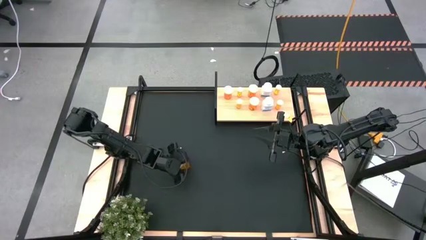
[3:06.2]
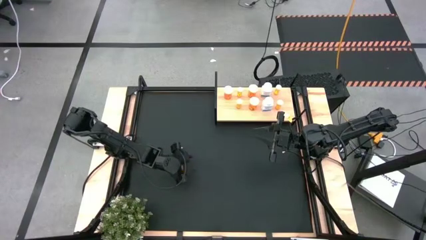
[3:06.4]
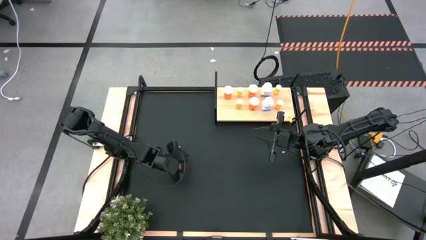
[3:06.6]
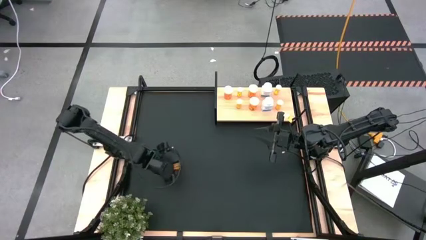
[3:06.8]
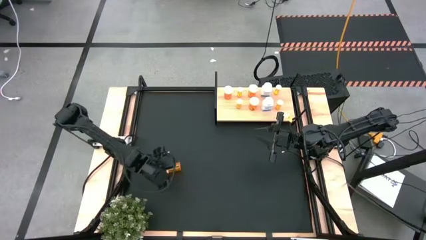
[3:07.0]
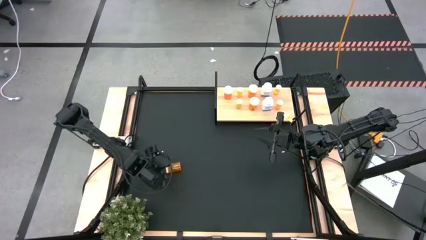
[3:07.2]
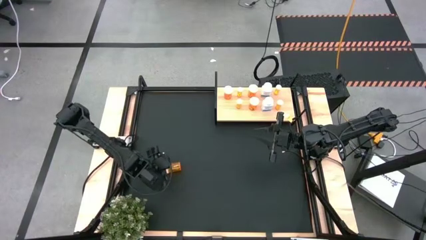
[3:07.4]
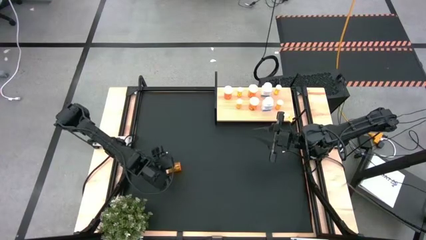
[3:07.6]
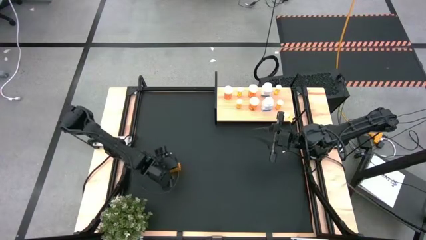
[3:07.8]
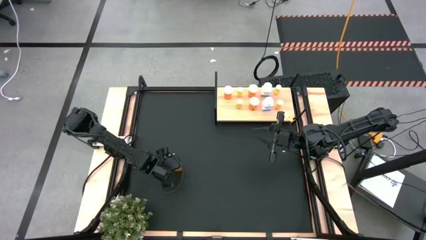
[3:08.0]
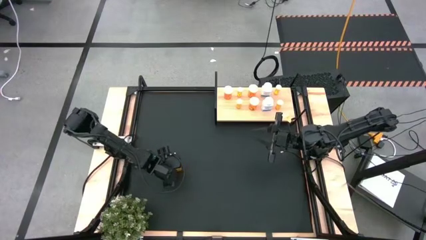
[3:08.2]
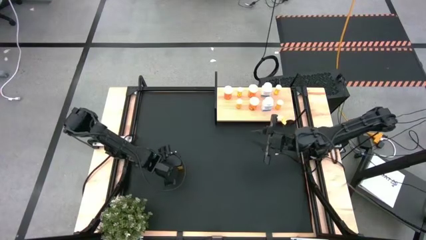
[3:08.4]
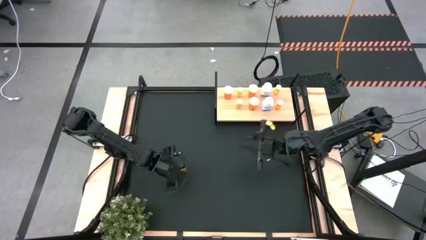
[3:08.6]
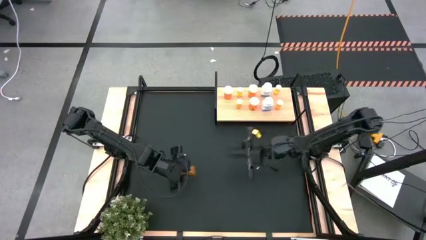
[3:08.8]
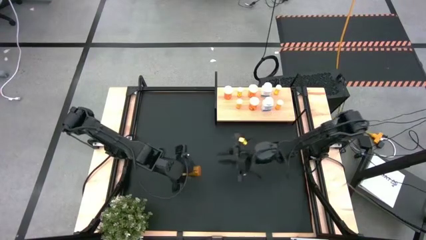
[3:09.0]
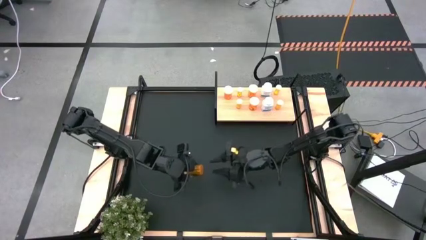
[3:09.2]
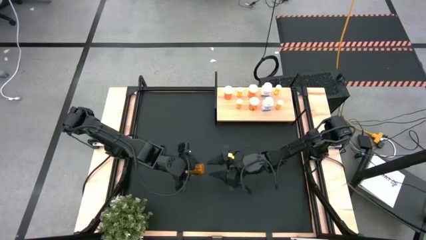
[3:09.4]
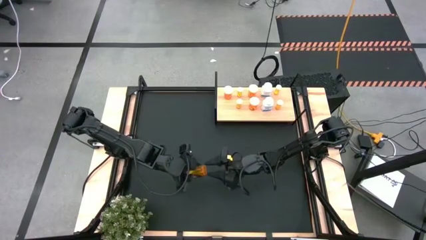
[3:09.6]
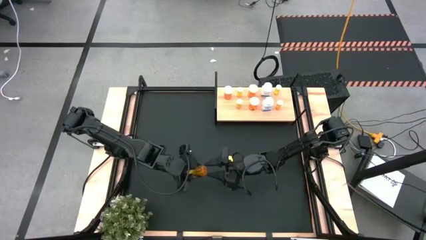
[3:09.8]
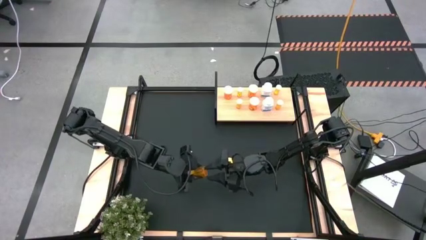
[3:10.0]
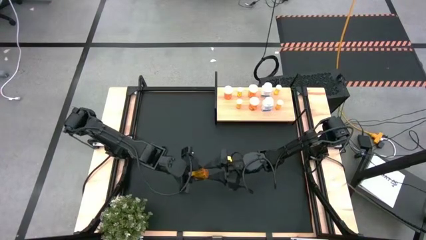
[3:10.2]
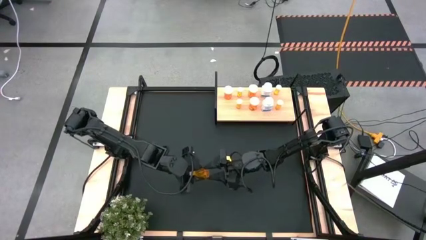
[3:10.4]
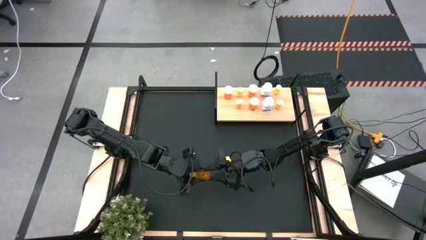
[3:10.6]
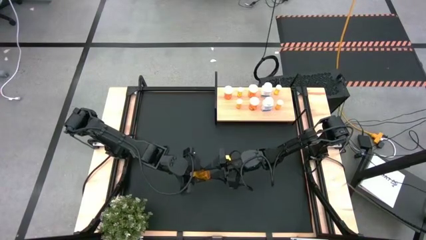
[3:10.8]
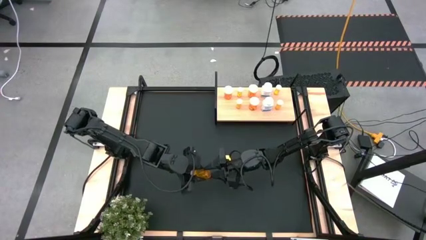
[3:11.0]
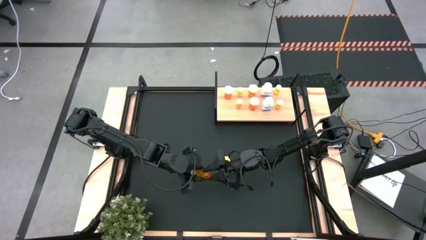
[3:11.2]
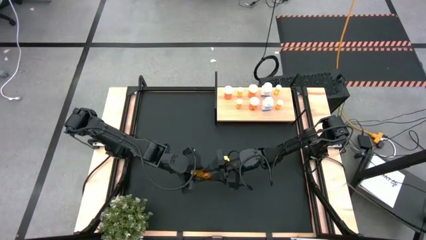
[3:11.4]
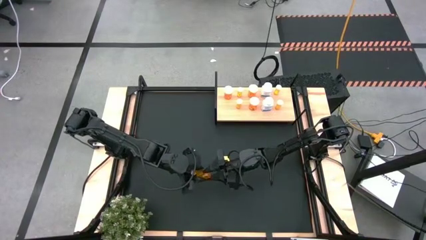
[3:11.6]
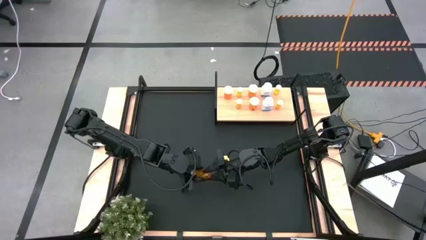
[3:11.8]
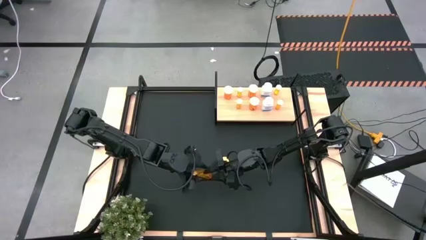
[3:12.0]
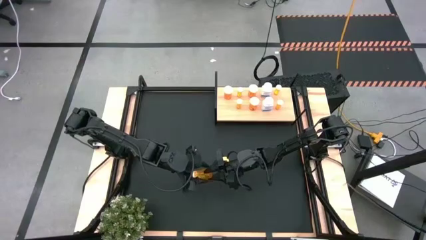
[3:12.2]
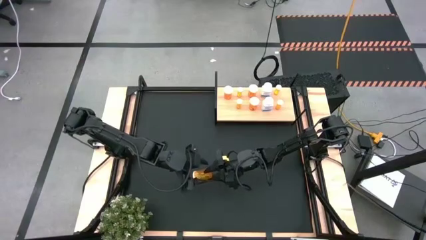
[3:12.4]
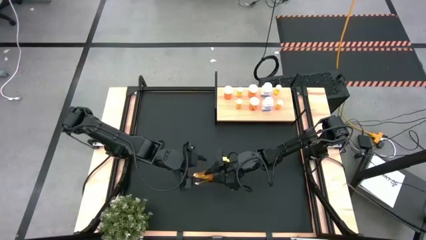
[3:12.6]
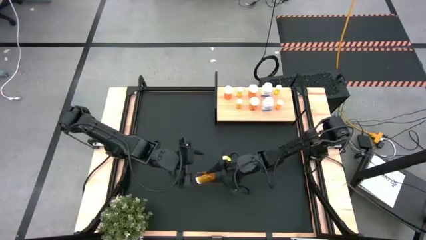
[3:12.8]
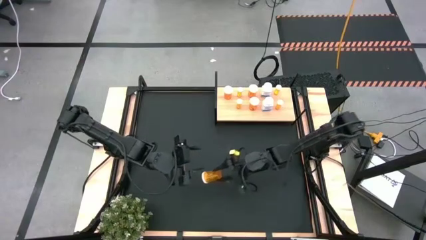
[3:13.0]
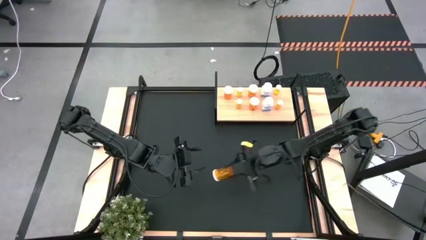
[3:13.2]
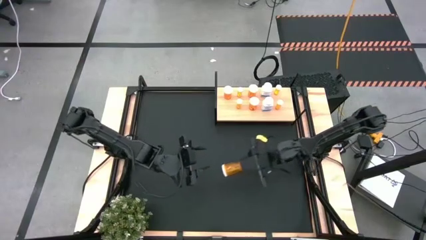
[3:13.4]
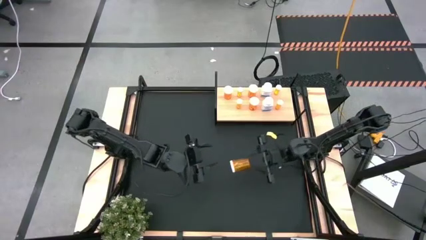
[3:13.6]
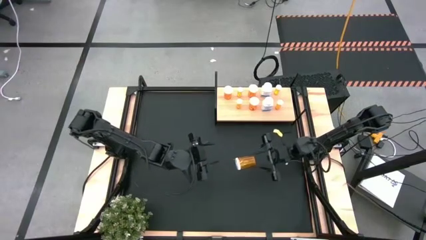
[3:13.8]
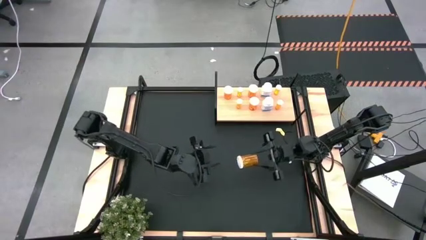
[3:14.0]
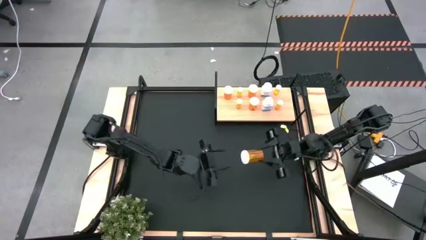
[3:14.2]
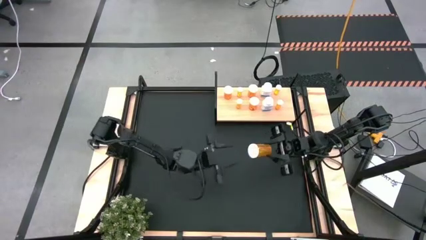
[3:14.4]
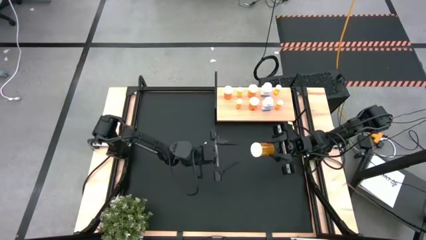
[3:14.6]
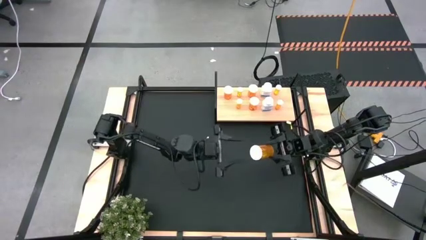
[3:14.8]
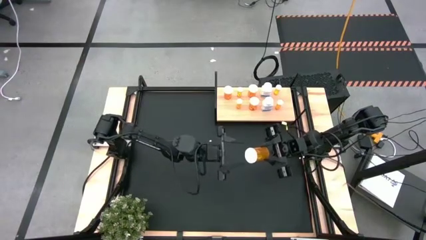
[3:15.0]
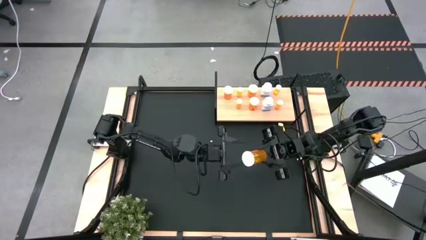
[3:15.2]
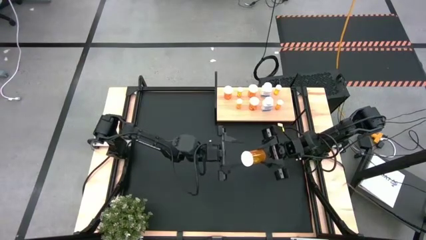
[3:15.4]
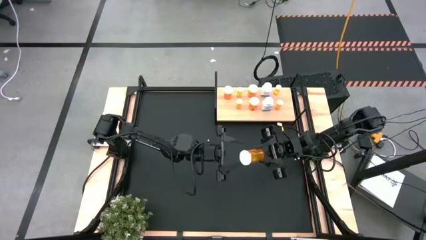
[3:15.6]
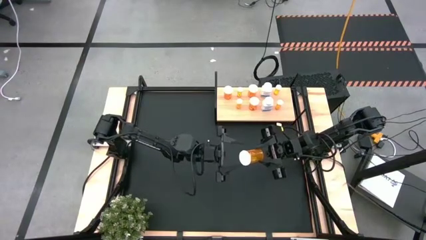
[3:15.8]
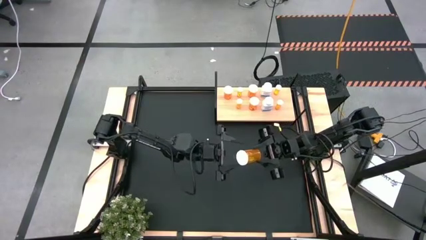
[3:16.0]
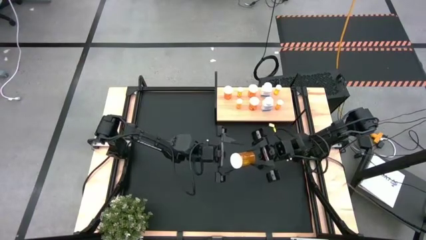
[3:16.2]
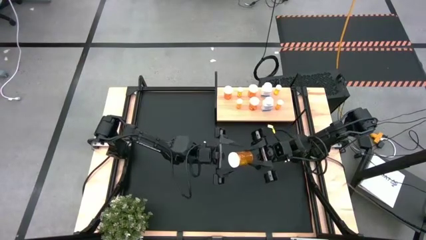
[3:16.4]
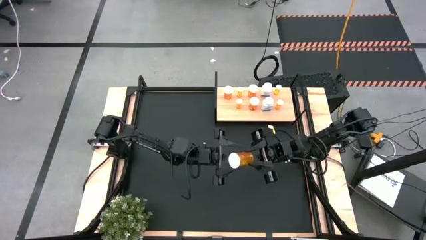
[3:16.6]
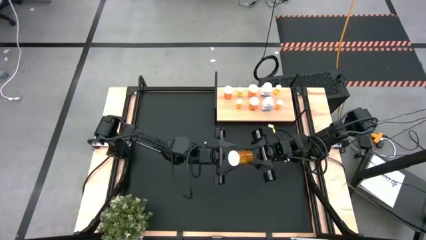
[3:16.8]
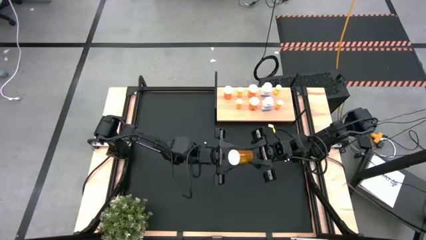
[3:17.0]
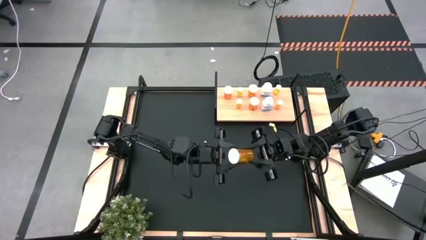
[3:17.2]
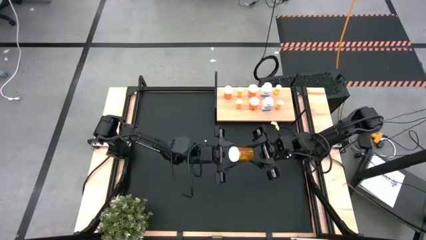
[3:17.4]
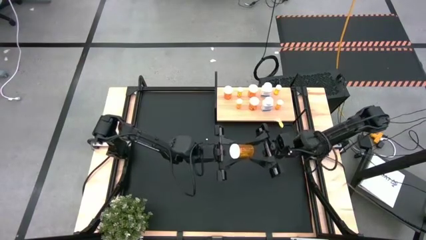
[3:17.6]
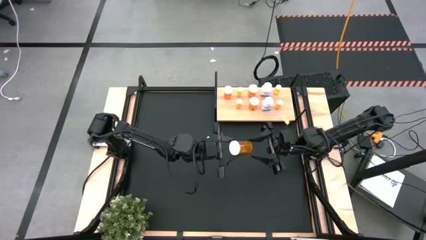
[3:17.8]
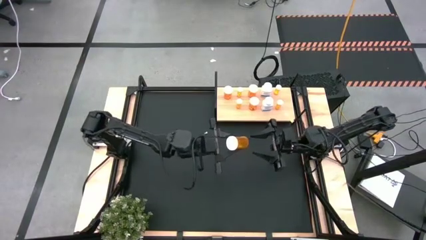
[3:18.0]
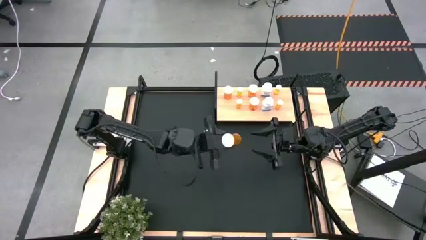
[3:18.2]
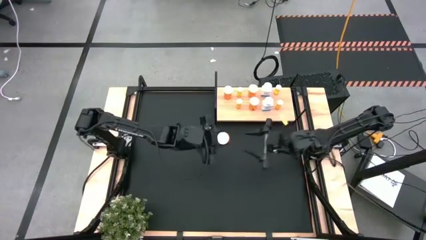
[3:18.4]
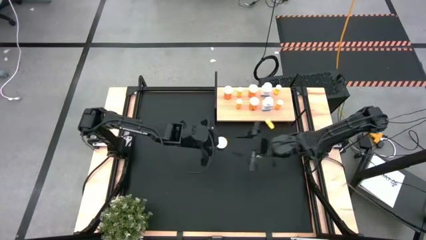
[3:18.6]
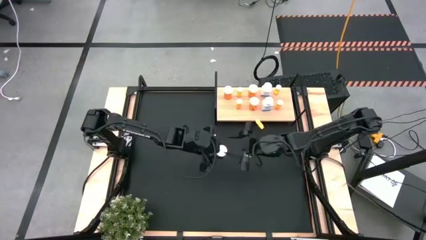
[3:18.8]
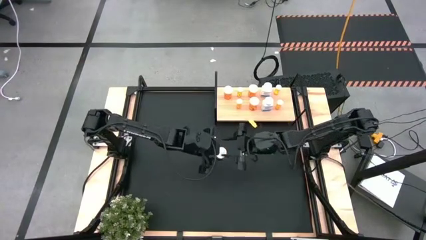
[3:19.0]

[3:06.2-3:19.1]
Task: Pick and place medicine bottles onto shelf by color
Put the large orange pill bottle on the shelf aligned with the other large orange pill bottle

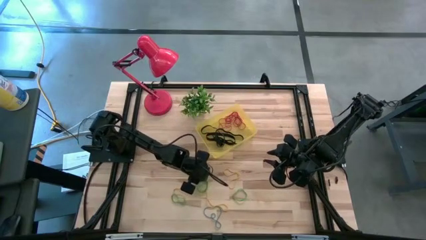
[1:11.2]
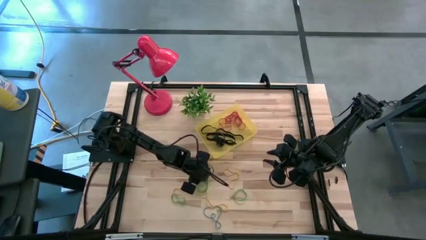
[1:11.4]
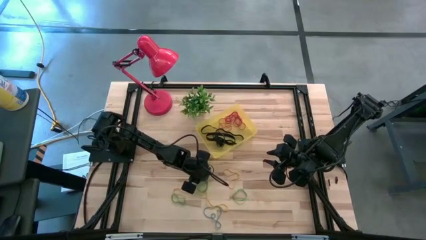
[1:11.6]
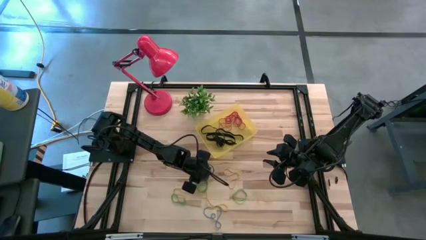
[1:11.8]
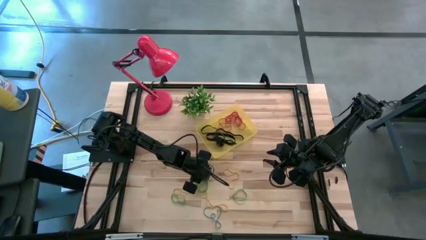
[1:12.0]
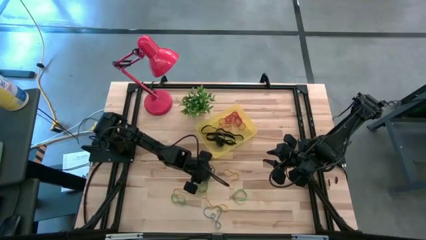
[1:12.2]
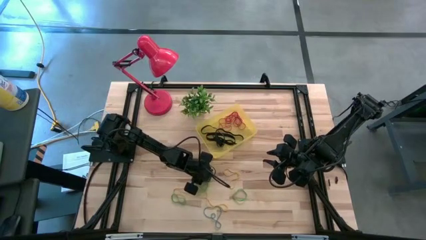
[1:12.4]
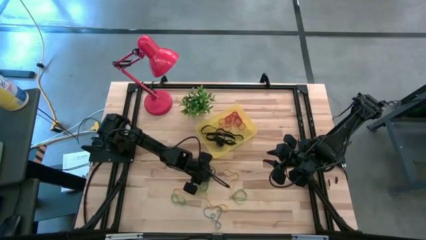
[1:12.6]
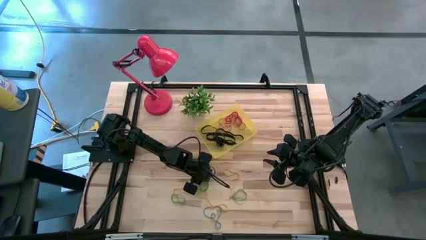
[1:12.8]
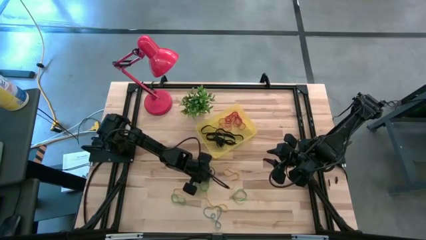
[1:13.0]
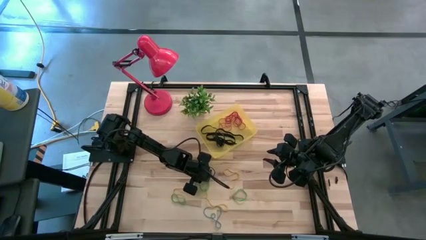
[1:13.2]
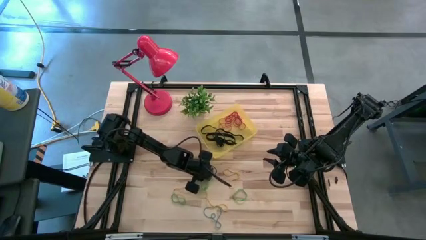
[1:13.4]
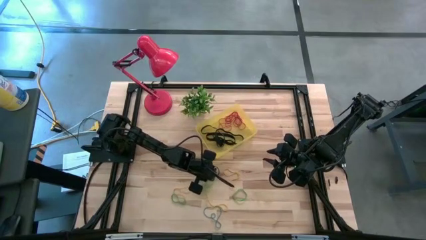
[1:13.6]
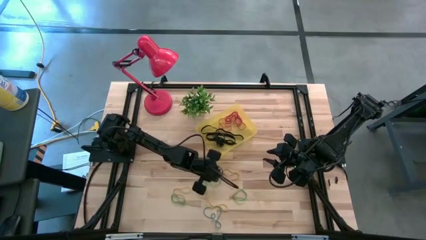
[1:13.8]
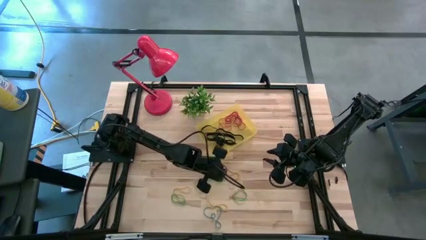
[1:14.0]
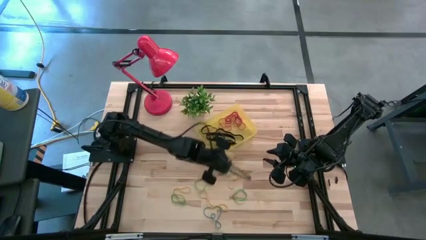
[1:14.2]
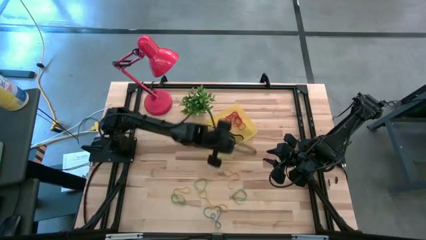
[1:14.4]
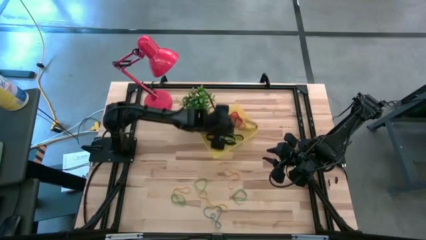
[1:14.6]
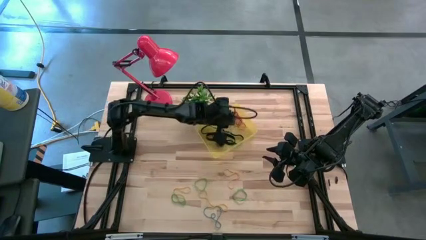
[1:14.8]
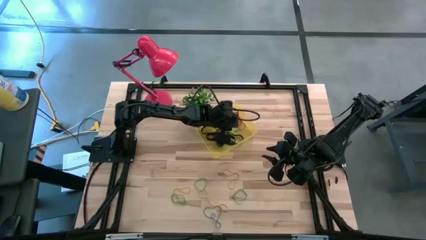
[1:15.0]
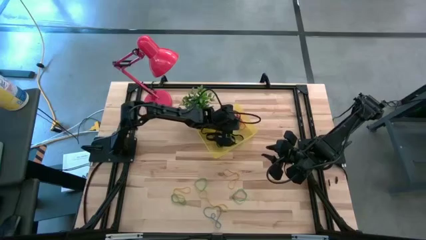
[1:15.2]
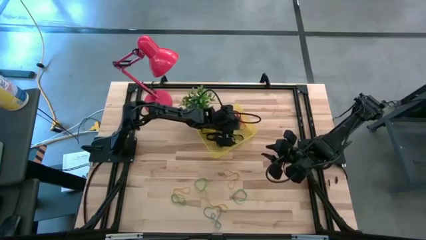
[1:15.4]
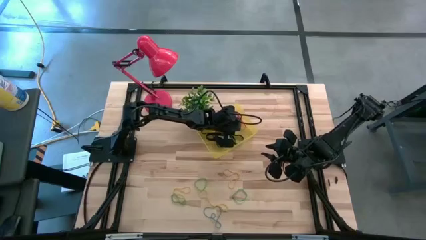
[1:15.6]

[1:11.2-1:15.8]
Task: Pick and place rubber bands into bin
Put the green rubber band into the transparent yellow bin
